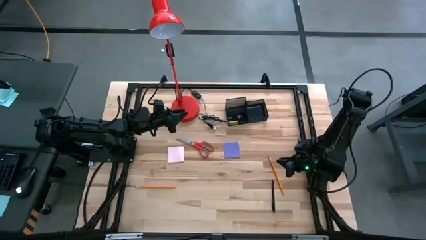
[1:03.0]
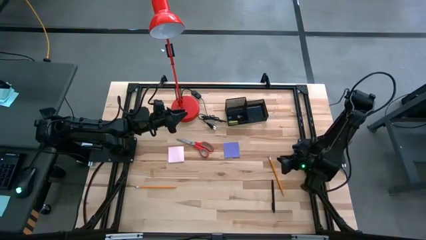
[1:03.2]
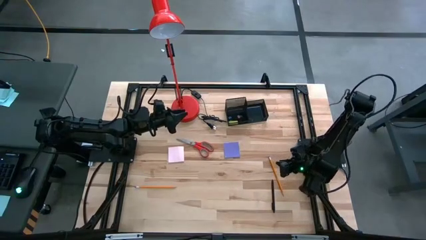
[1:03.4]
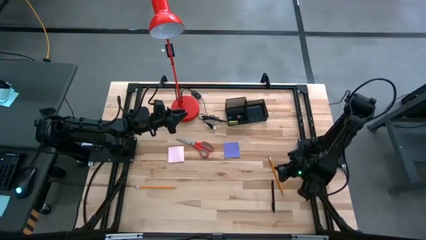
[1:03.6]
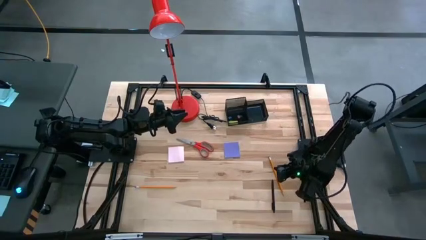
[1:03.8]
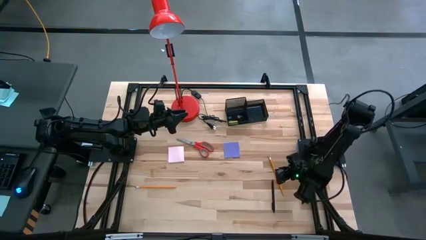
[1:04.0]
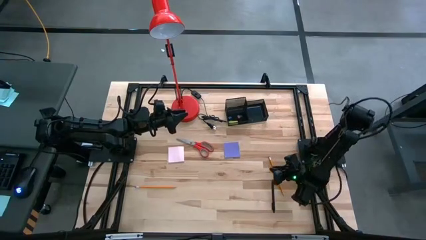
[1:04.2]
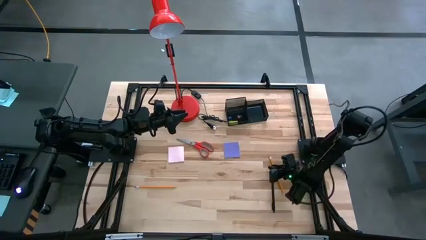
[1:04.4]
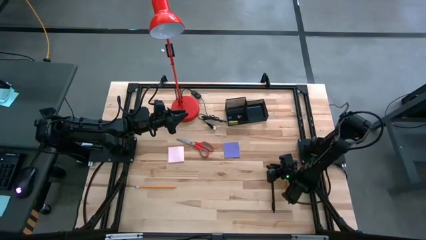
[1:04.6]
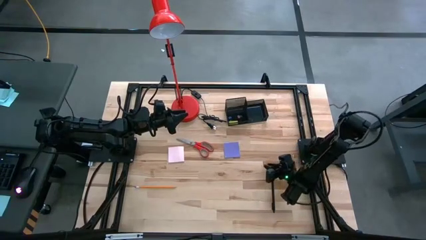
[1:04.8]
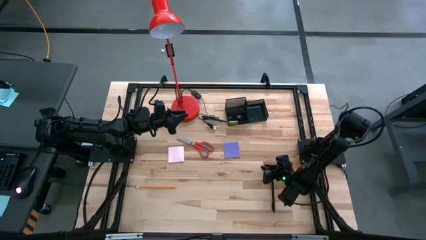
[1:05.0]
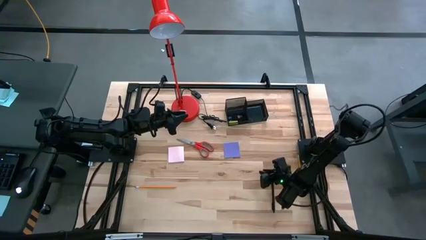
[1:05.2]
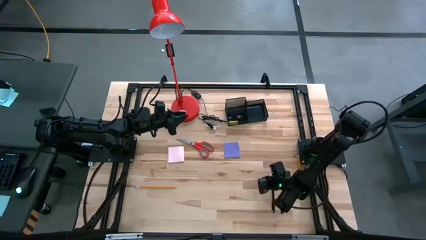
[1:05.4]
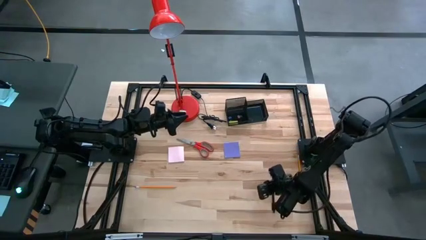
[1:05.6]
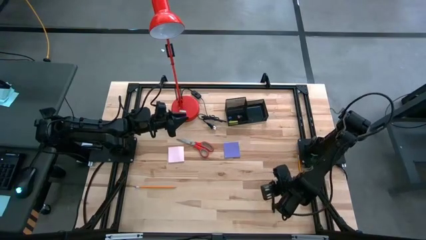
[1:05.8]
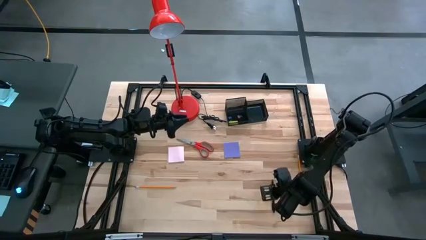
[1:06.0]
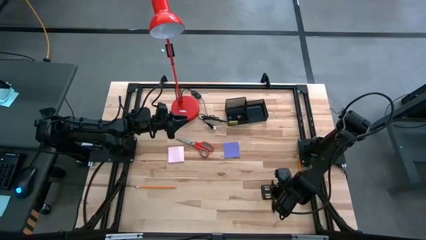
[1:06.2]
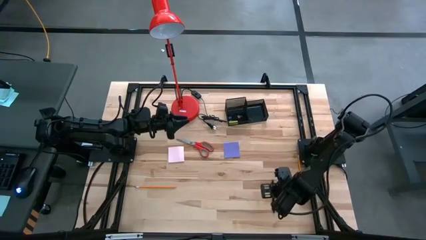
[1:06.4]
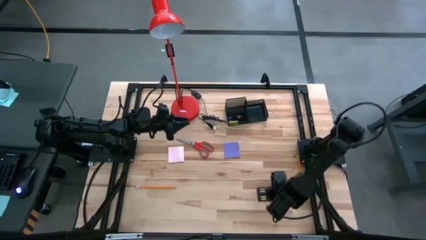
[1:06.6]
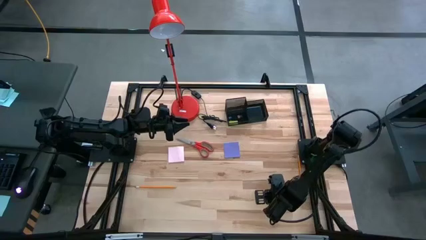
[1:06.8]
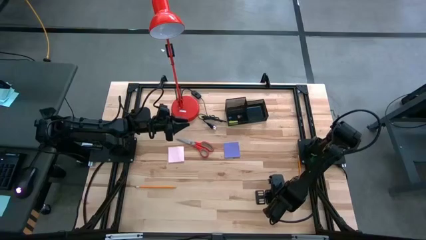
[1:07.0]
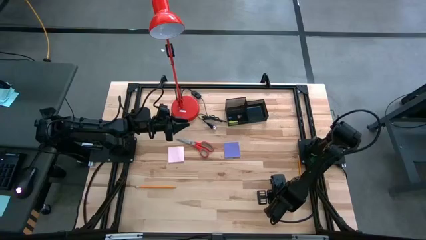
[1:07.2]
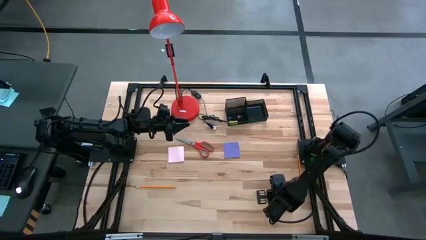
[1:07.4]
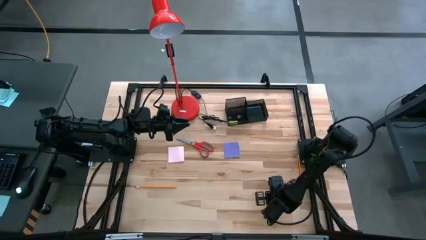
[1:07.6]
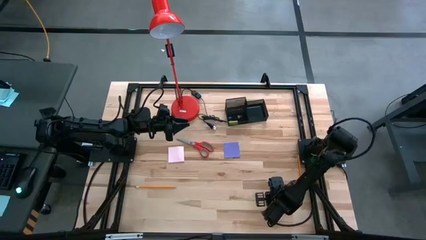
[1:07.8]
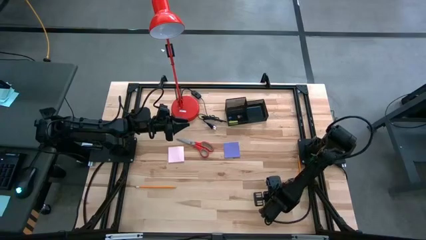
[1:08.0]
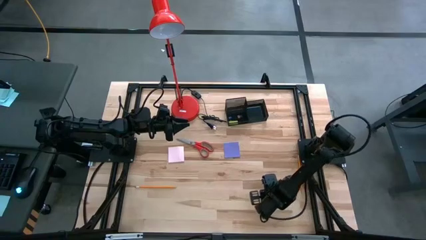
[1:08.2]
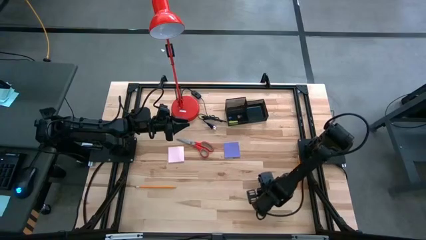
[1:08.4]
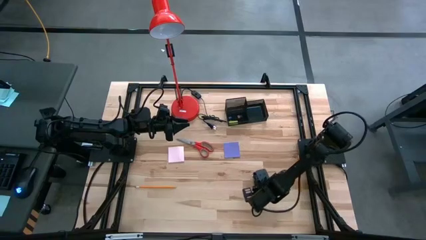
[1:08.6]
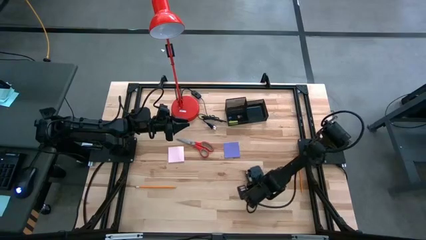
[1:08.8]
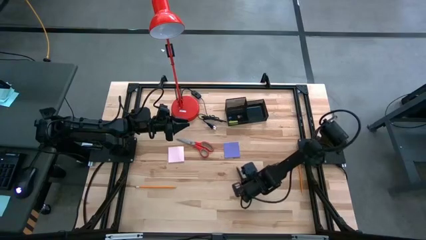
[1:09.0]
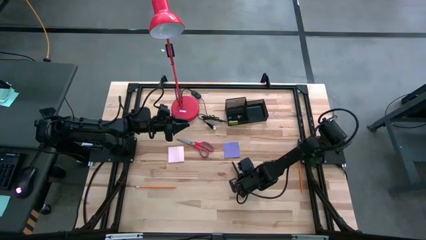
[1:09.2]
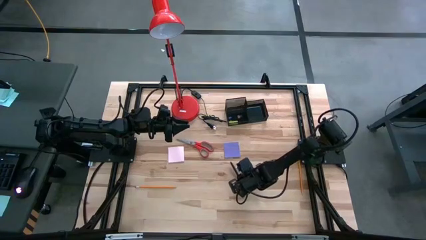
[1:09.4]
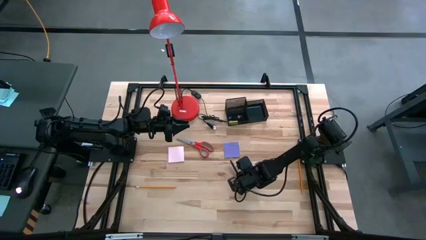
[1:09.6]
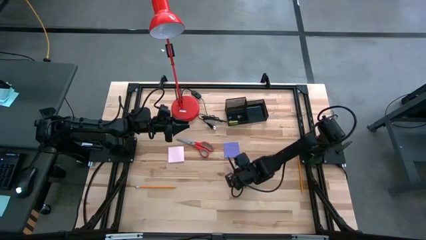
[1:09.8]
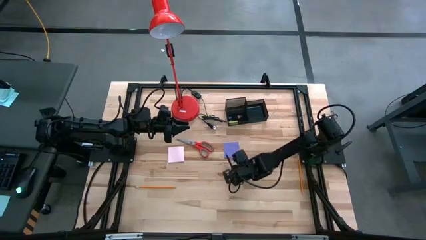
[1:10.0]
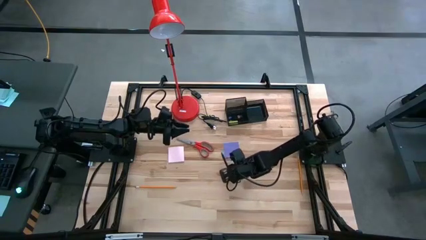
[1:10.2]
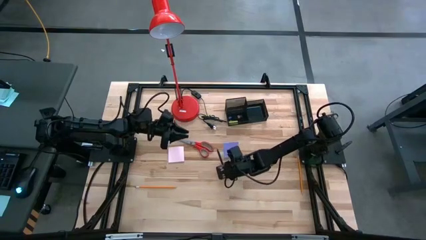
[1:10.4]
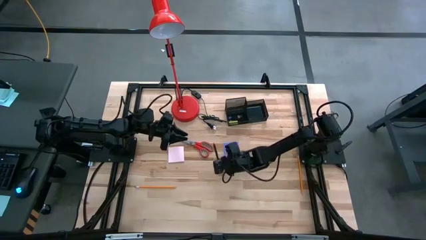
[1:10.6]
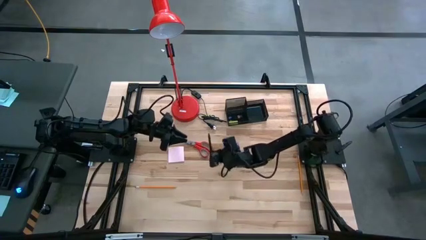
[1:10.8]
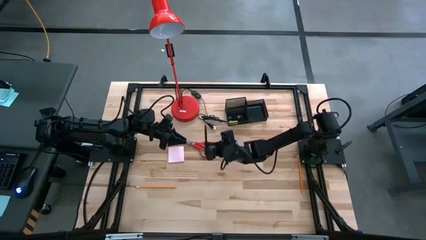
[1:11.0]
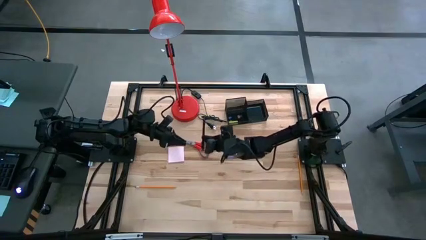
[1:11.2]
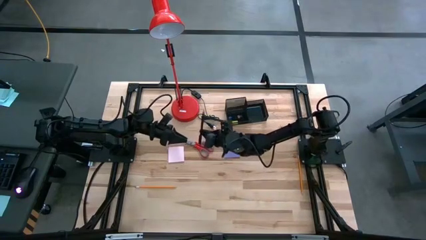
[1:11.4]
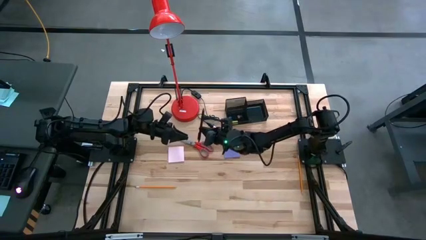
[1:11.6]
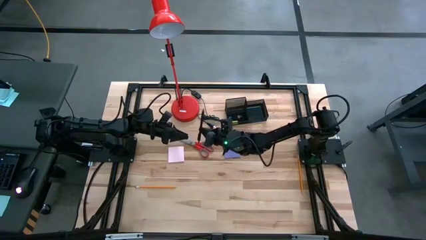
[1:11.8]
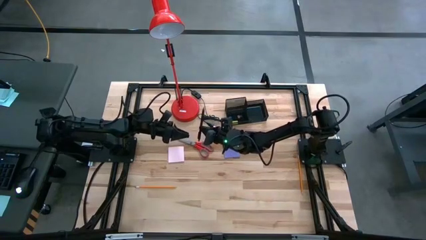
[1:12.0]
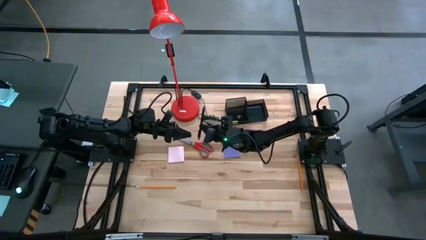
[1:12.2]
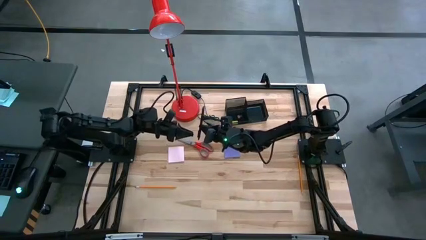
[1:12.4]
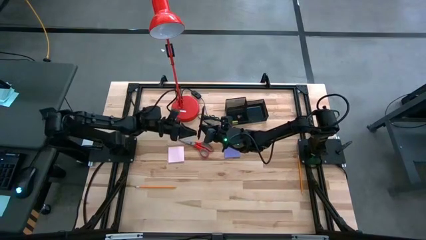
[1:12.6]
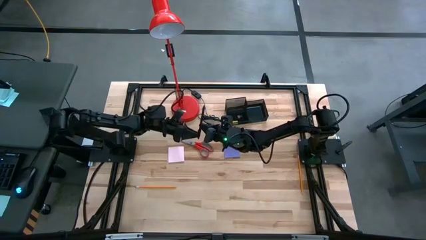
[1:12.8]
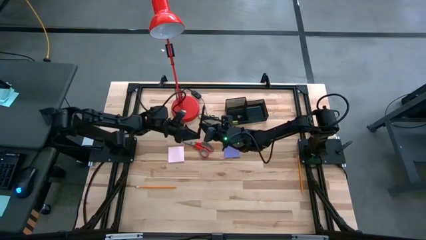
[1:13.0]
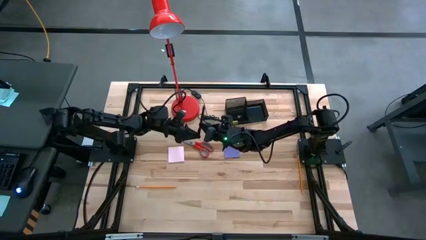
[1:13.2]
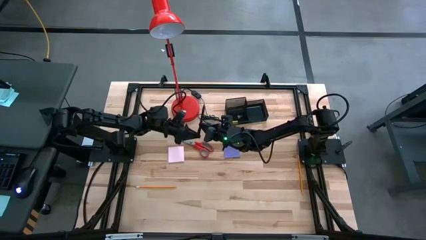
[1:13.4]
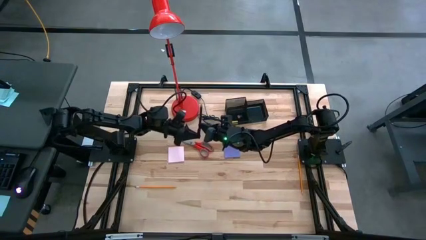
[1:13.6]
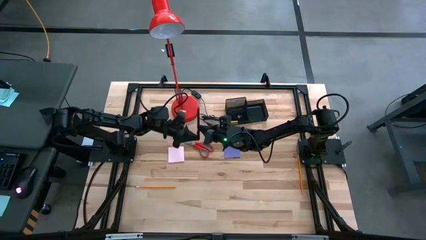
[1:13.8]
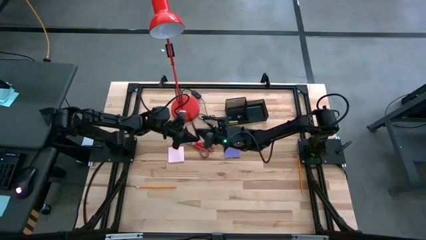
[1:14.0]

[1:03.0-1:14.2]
Task: Pick and place office supplies into organizer
Put the black pen into the black desk organizer
